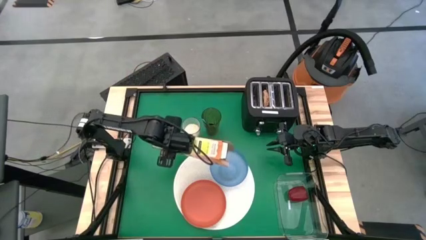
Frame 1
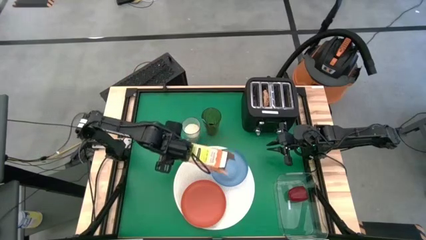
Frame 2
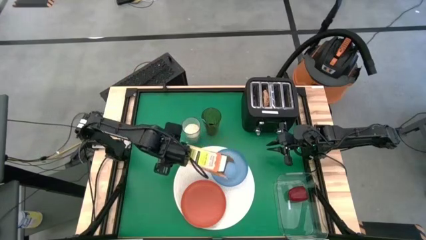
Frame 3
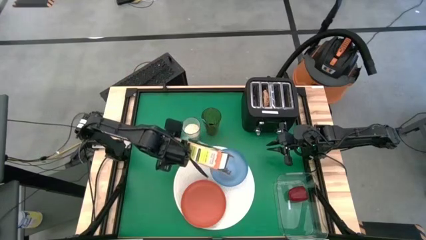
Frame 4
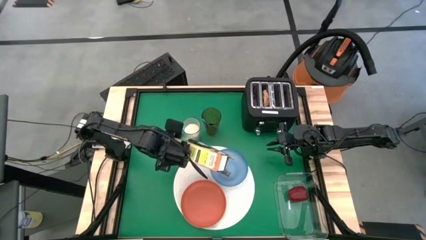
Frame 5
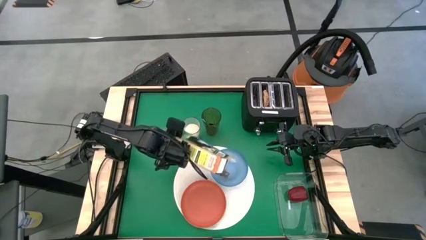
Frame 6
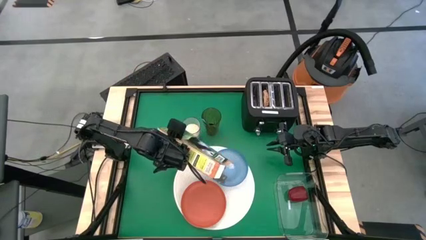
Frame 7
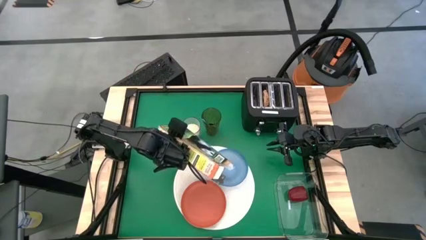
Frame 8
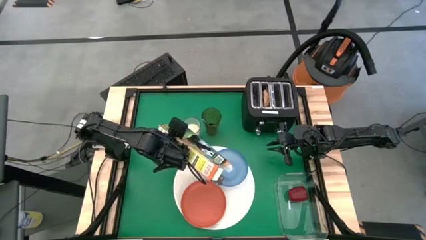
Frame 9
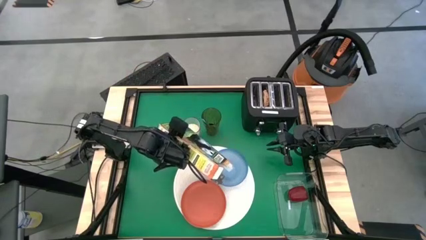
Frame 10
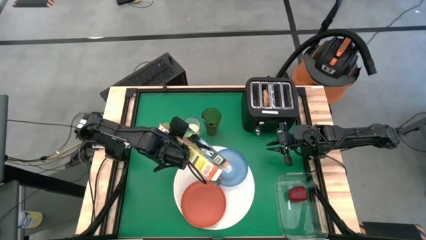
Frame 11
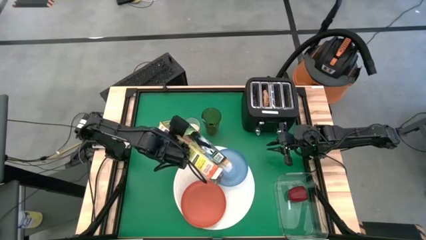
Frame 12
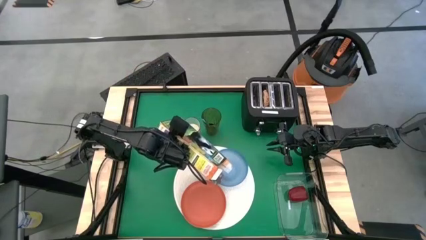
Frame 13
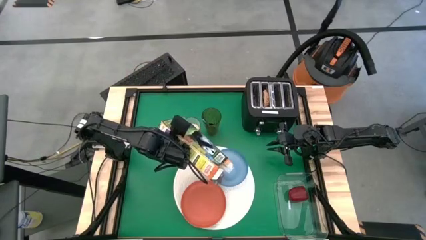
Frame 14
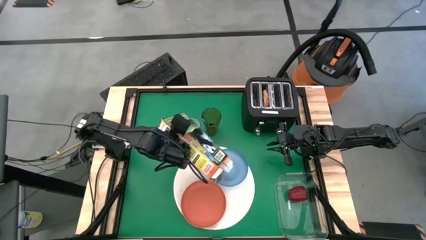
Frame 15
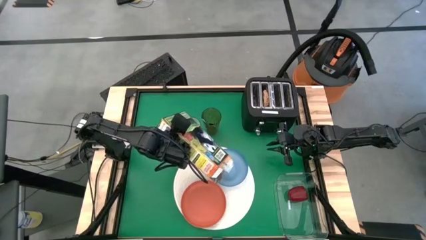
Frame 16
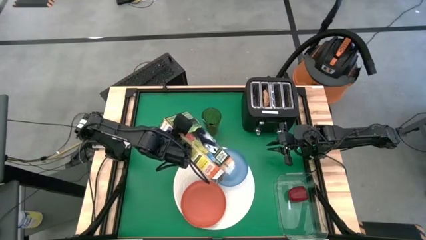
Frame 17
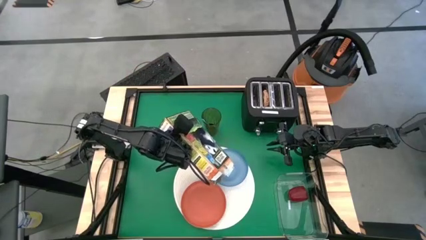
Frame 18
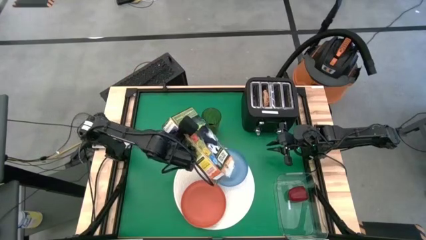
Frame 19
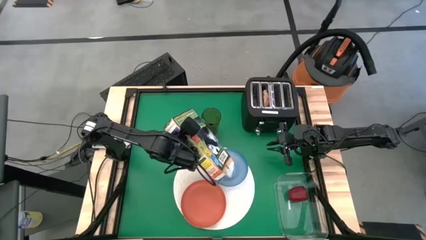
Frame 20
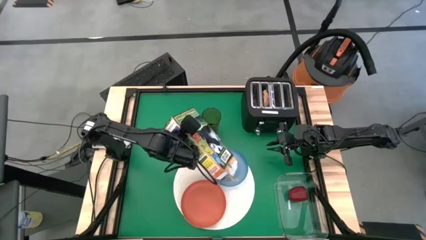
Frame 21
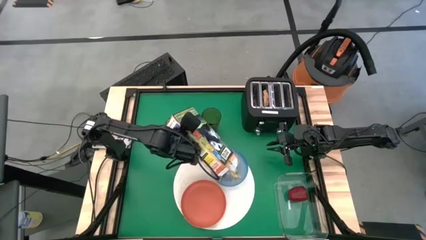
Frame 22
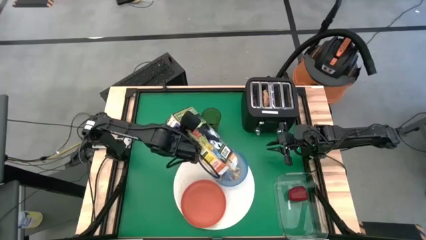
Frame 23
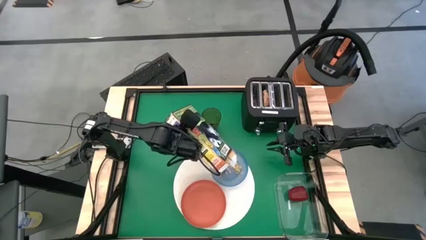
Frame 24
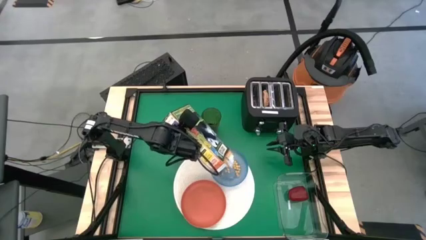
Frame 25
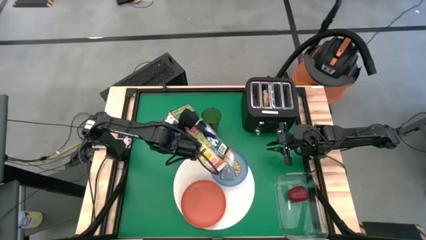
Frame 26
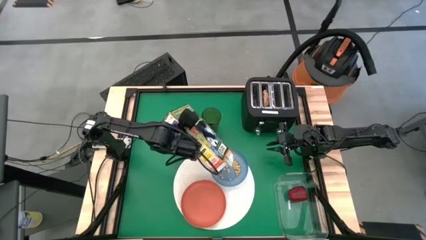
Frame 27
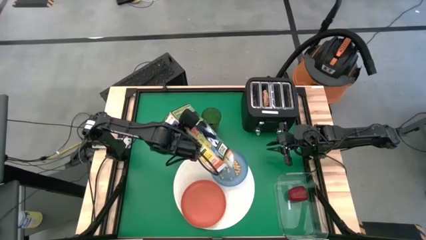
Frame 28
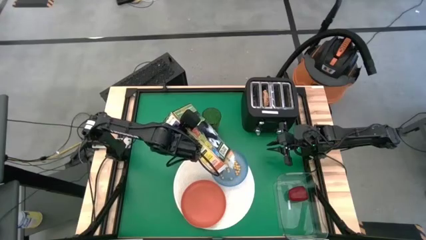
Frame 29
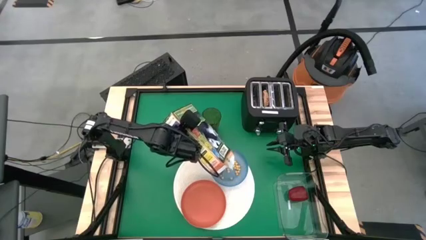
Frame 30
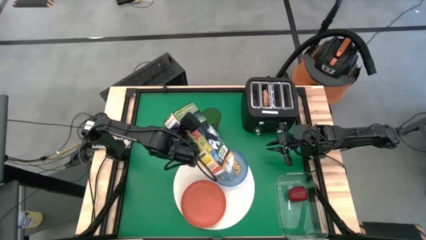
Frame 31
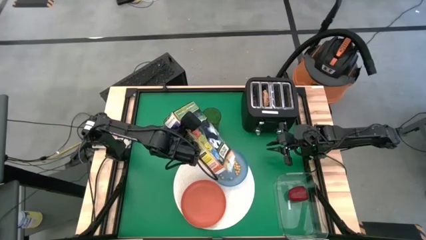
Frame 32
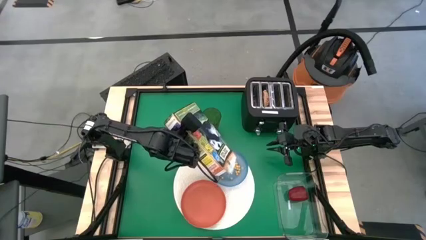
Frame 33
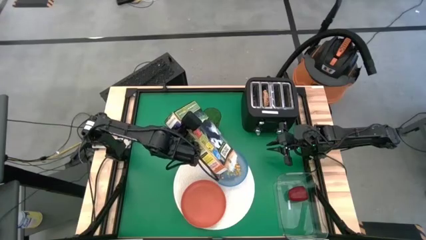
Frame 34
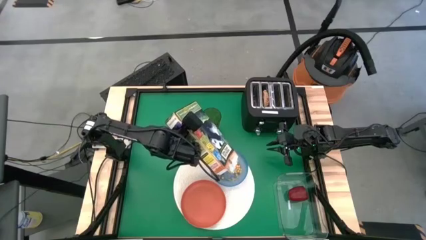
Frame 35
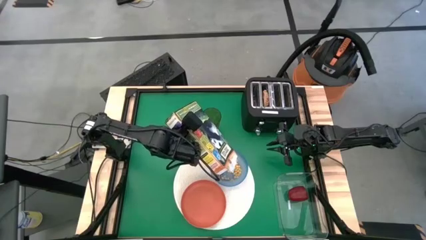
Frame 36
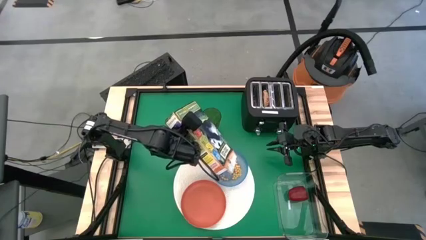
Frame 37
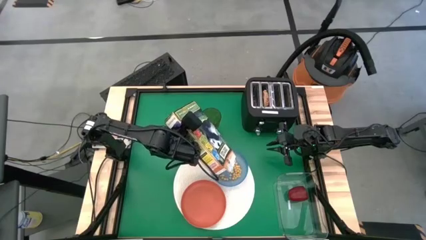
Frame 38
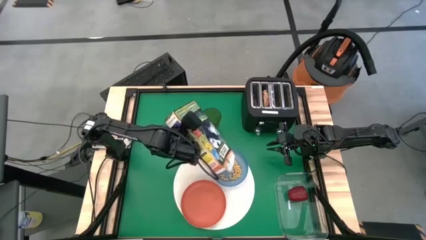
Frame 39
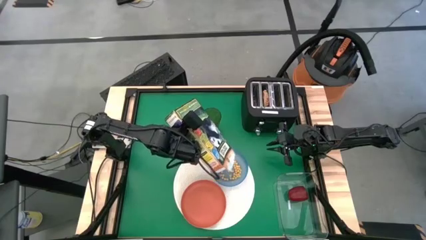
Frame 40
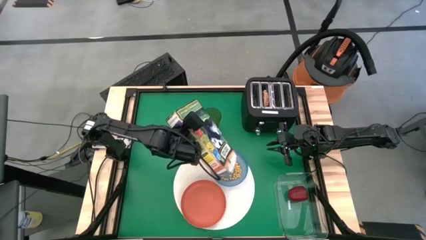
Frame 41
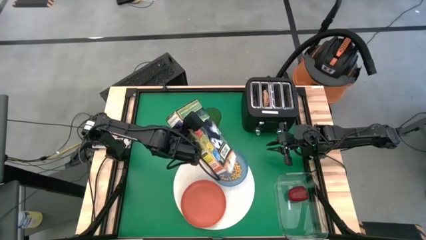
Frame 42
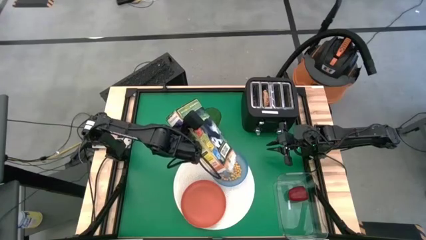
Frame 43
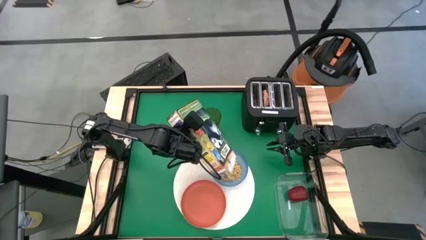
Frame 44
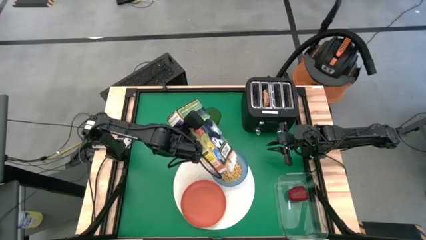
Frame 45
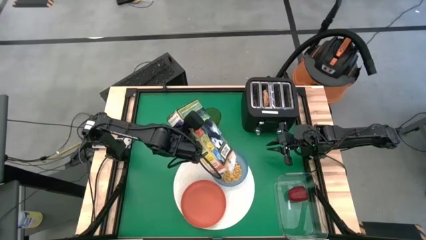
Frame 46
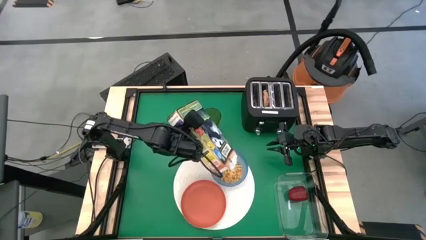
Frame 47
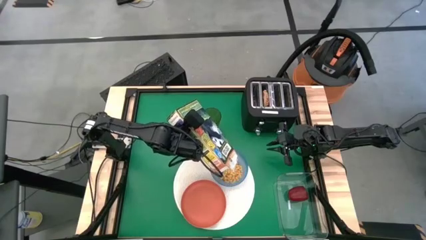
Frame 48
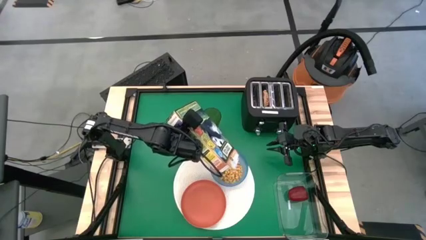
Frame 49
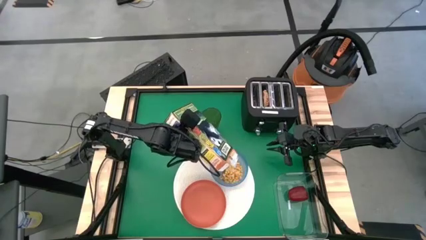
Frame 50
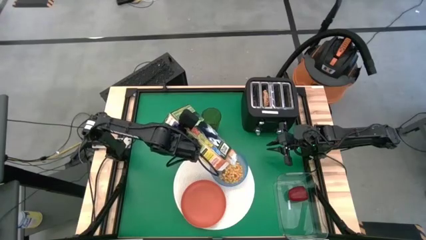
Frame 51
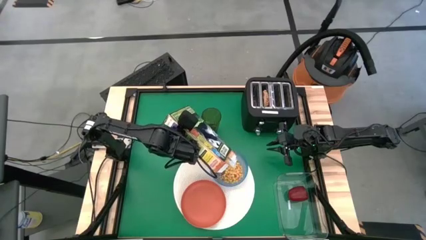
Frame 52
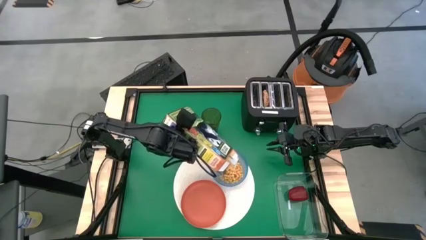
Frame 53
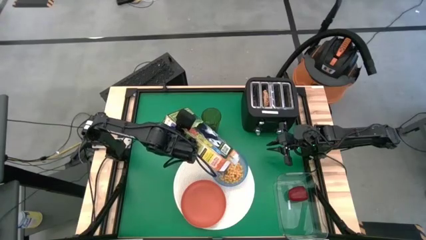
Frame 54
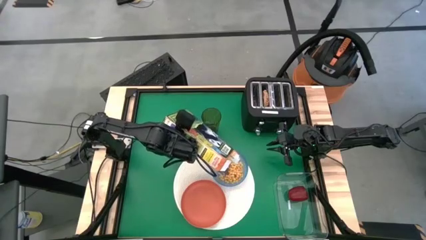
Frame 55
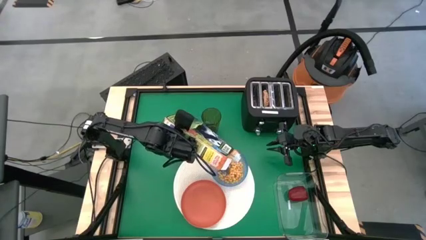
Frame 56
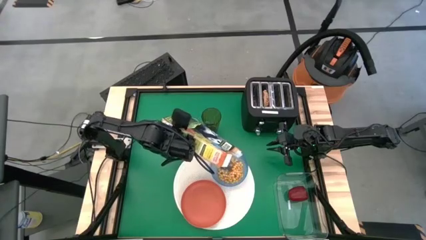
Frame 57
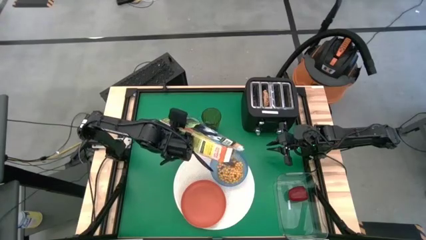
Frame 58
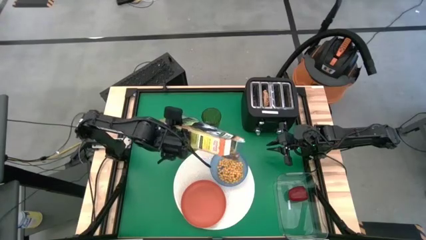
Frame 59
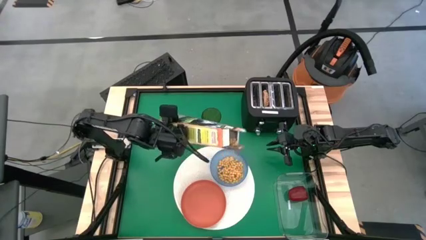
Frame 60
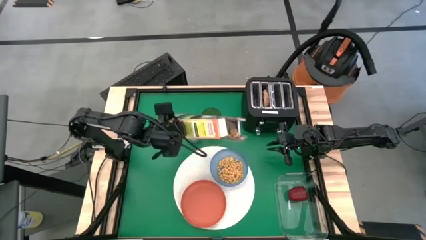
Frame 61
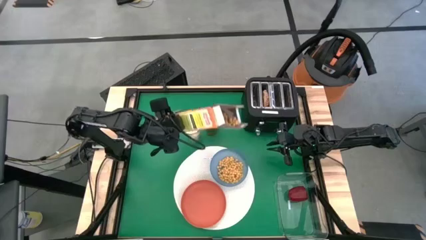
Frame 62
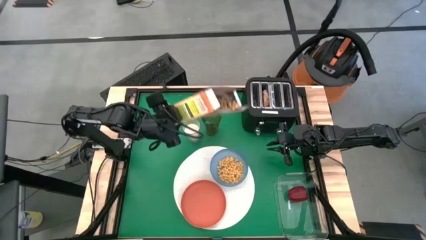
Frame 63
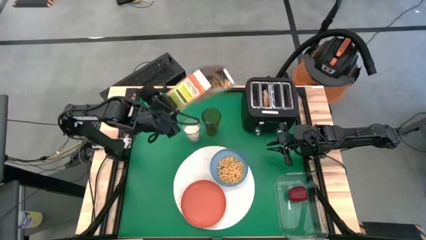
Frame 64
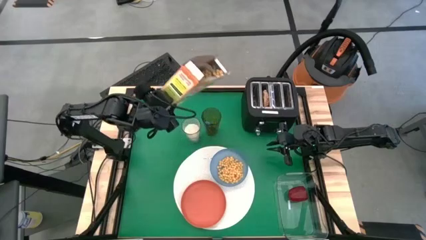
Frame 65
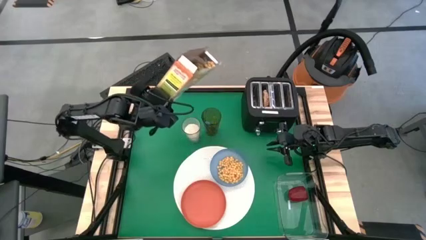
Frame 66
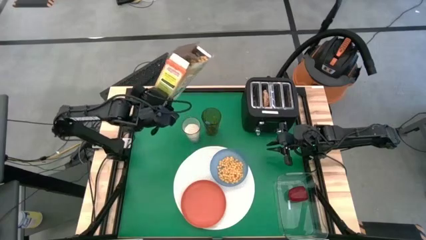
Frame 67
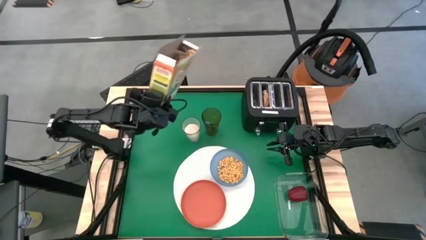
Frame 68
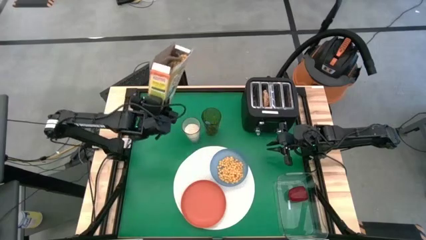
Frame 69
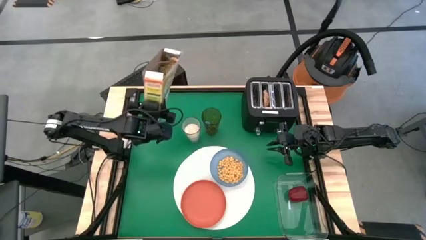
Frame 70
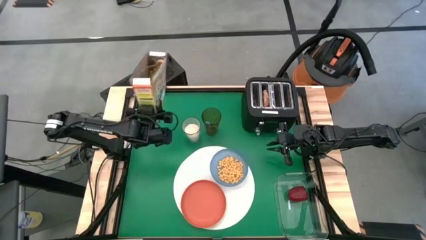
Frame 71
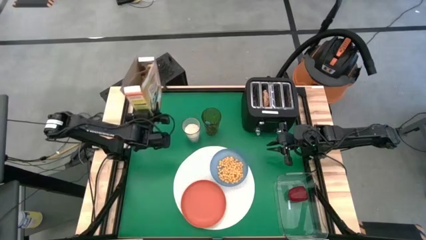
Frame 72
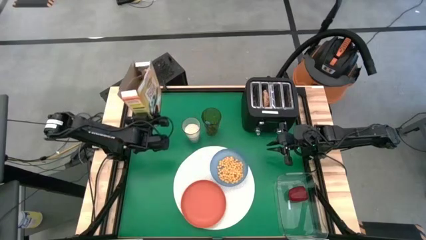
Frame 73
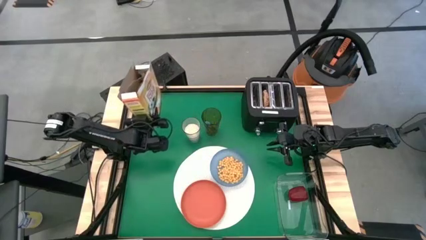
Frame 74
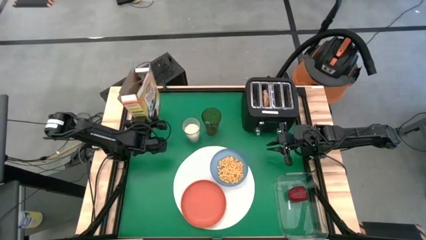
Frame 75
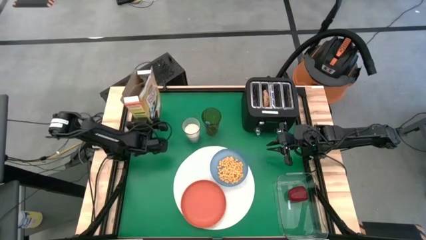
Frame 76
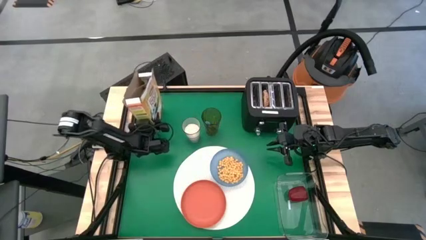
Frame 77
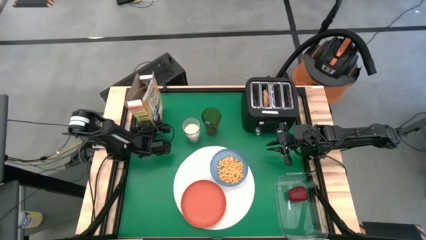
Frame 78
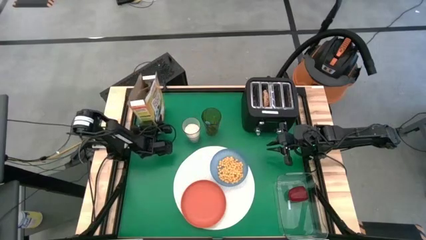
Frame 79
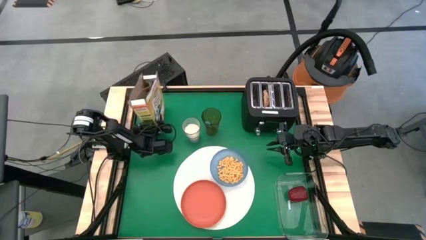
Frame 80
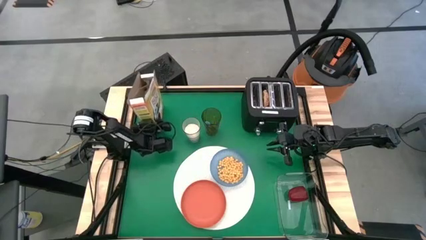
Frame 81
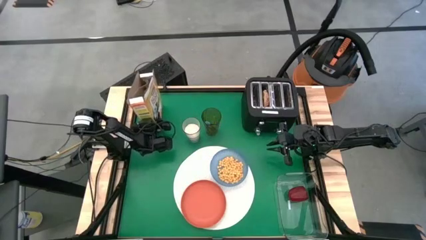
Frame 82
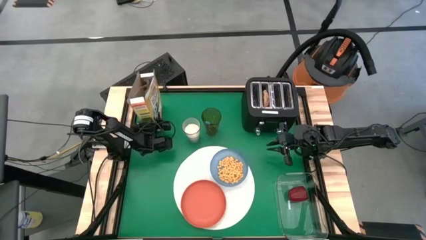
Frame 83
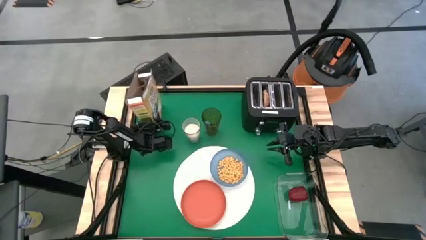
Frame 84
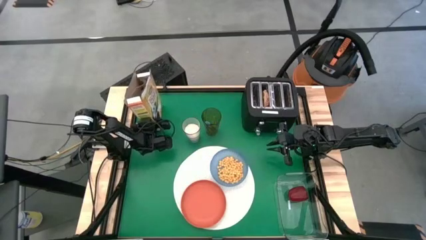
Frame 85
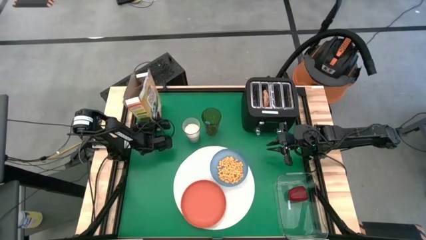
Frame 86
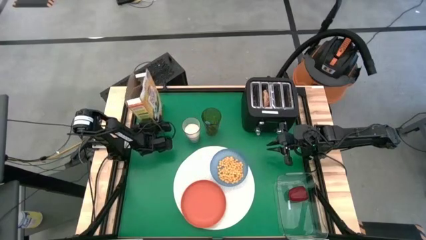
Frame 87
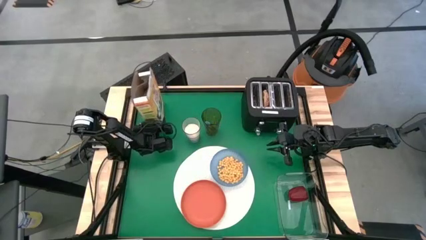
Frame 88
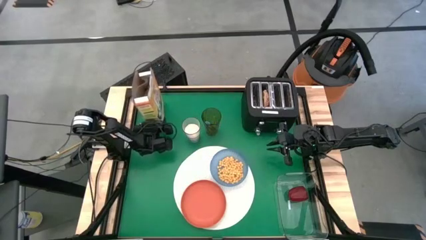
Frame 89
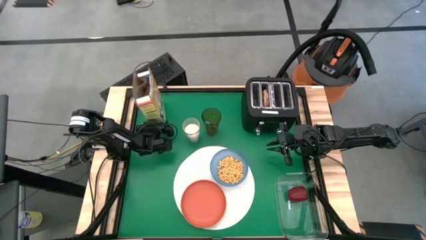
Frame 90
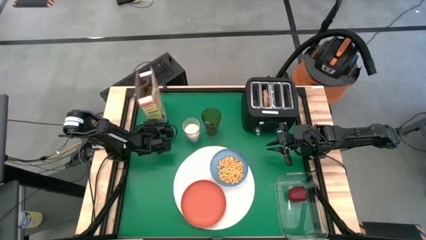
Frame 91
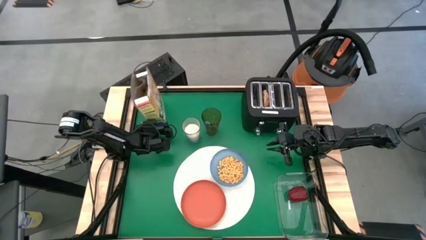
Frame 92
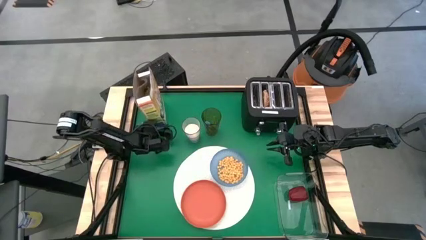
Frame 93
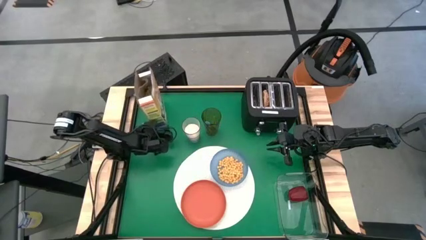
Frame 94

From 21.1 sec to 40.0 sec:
Task: Arrange a breakfast setting
Pour the cereal from the cereal box on the blue bowl
